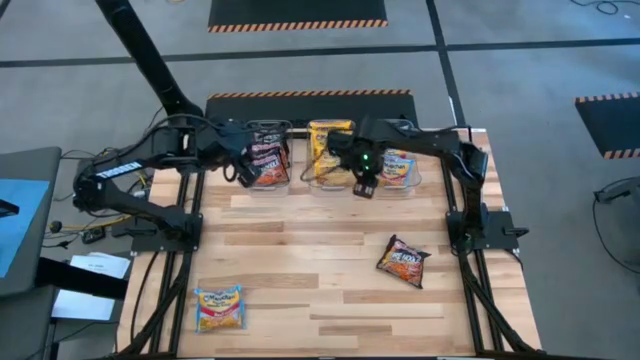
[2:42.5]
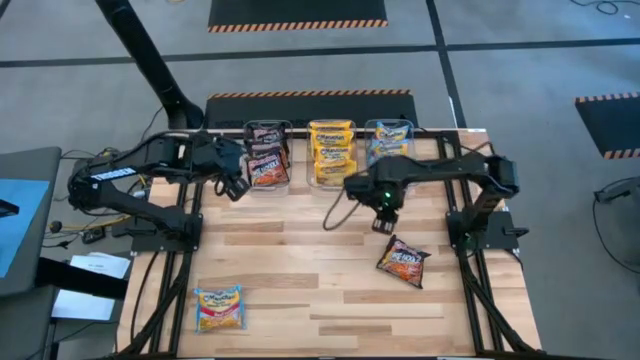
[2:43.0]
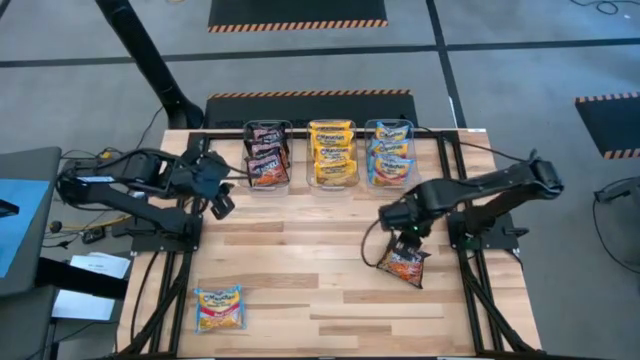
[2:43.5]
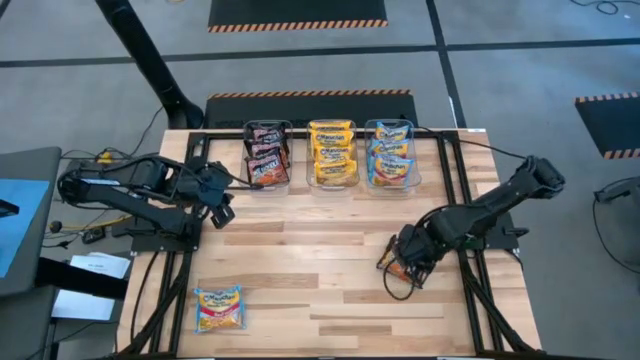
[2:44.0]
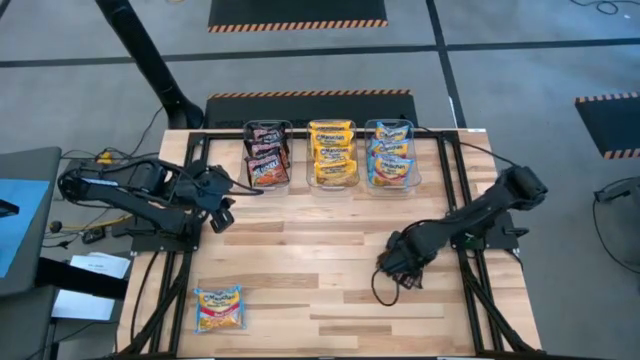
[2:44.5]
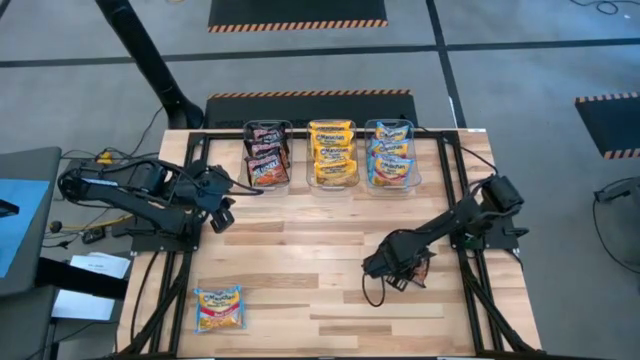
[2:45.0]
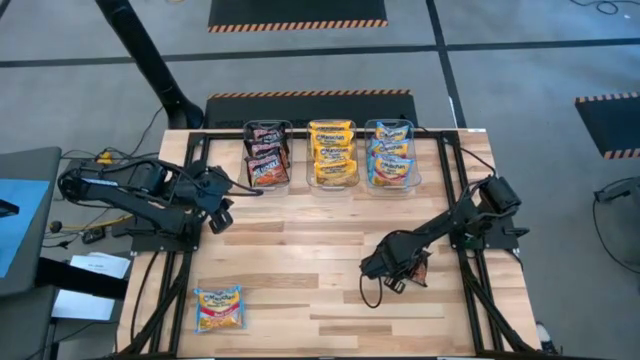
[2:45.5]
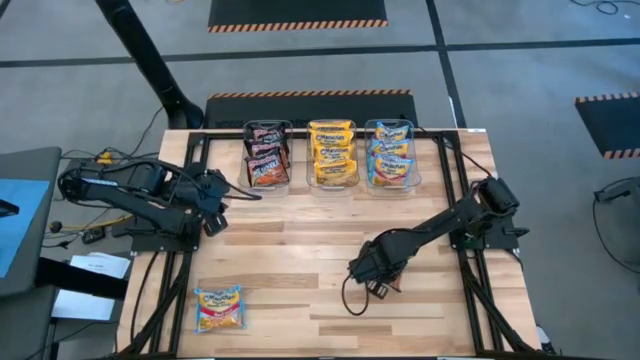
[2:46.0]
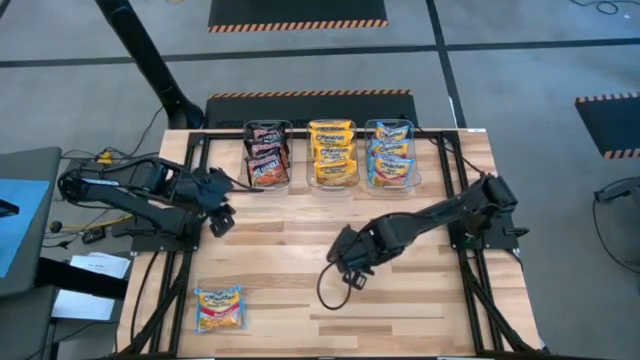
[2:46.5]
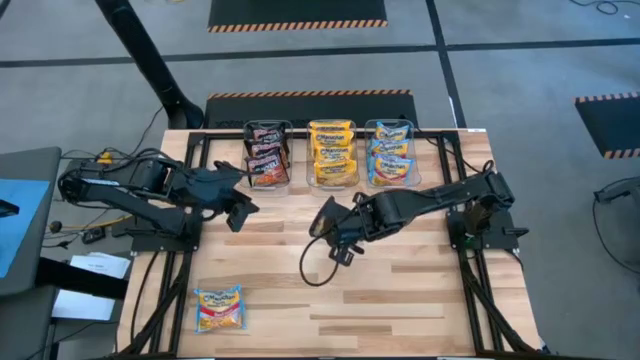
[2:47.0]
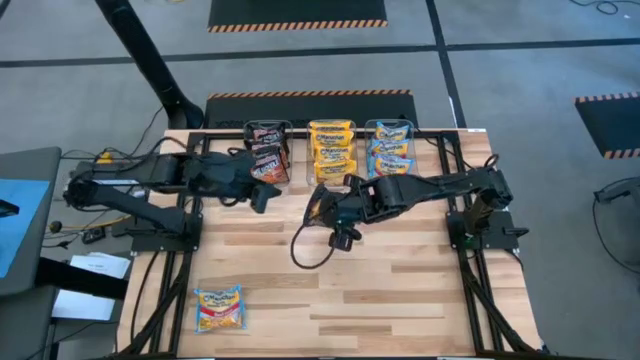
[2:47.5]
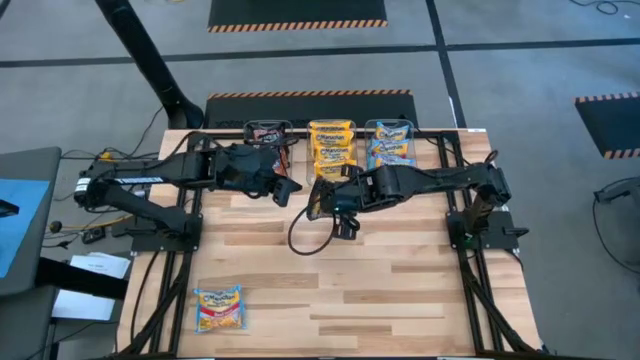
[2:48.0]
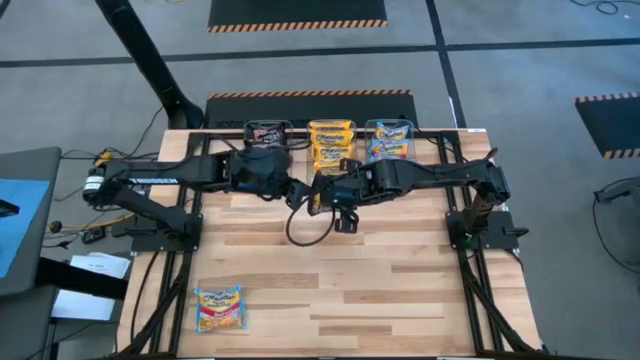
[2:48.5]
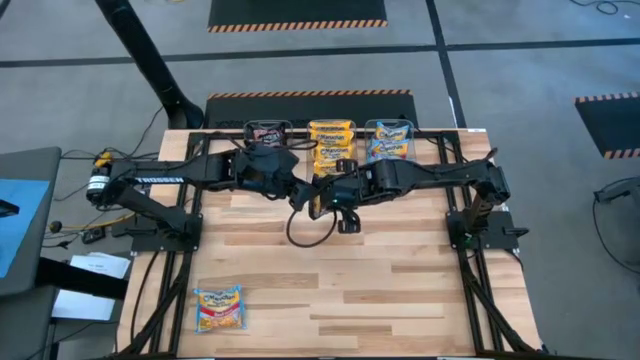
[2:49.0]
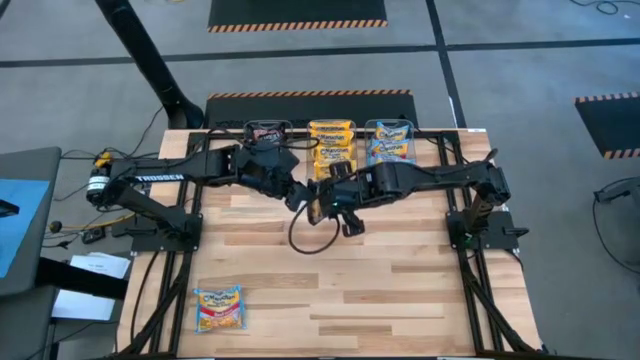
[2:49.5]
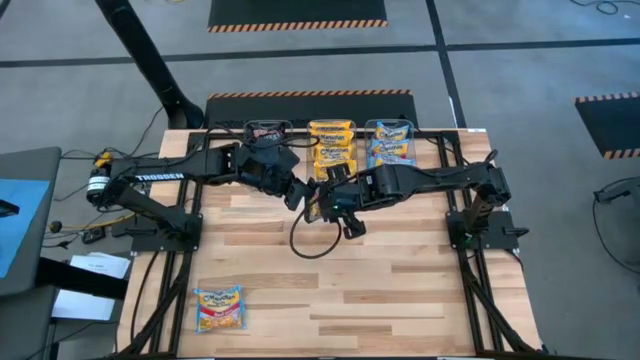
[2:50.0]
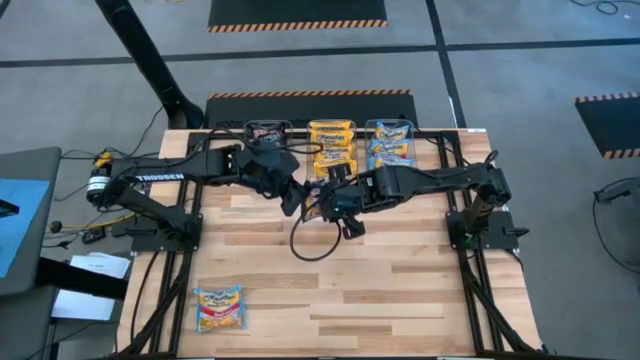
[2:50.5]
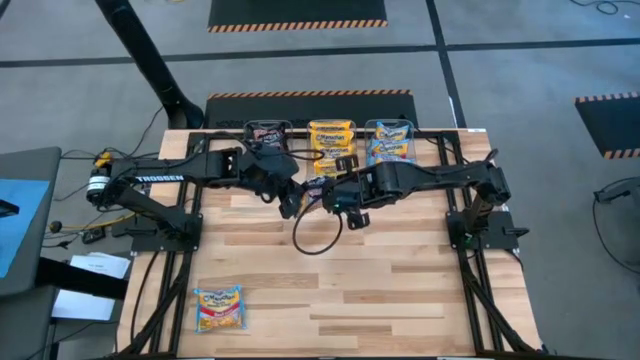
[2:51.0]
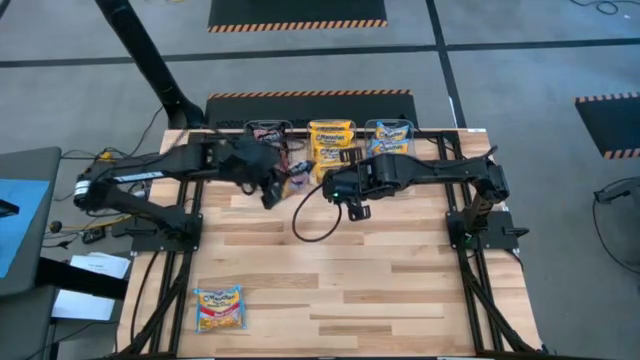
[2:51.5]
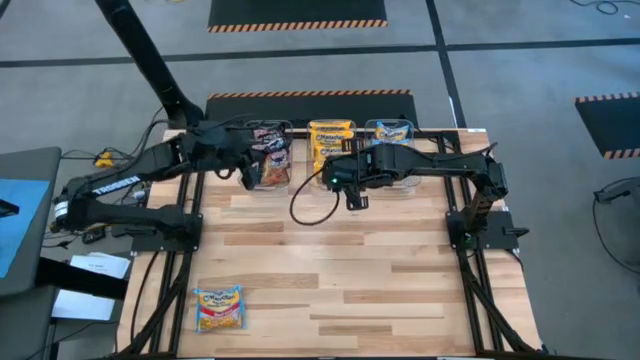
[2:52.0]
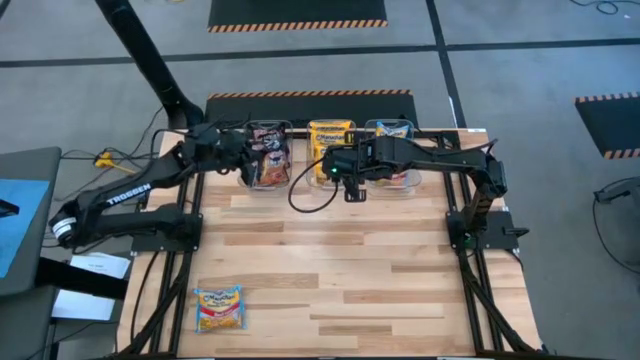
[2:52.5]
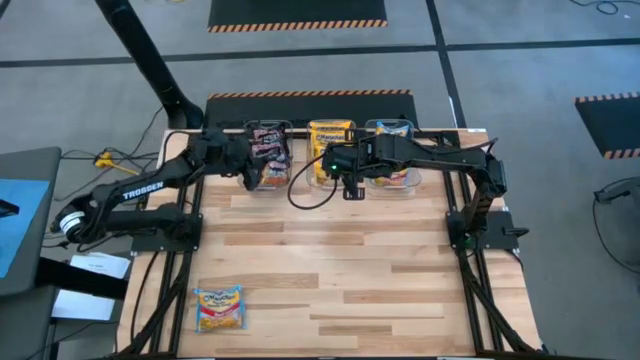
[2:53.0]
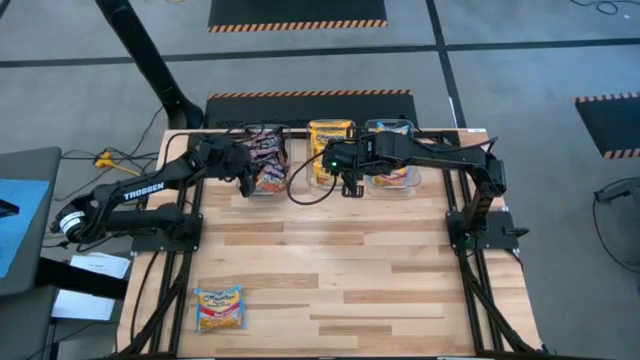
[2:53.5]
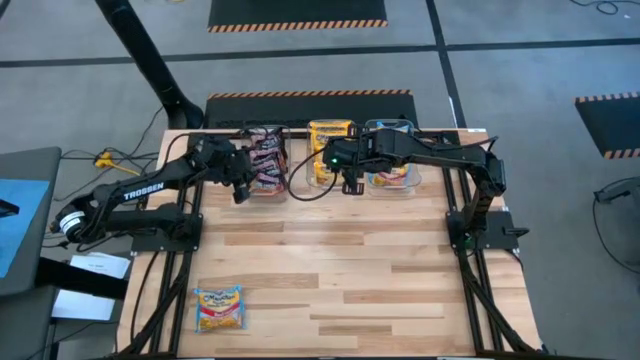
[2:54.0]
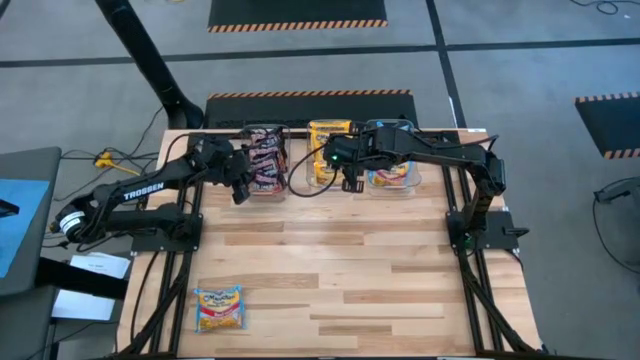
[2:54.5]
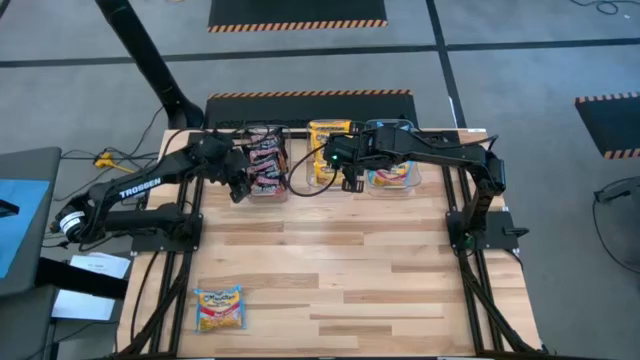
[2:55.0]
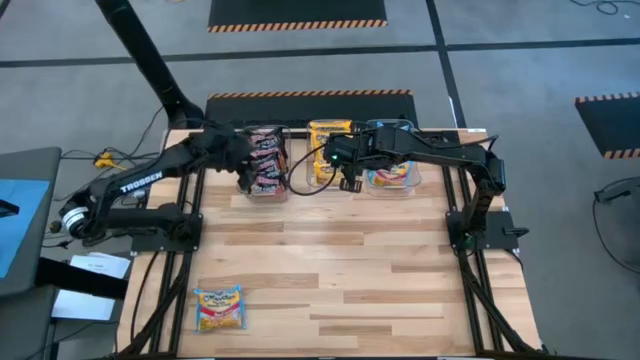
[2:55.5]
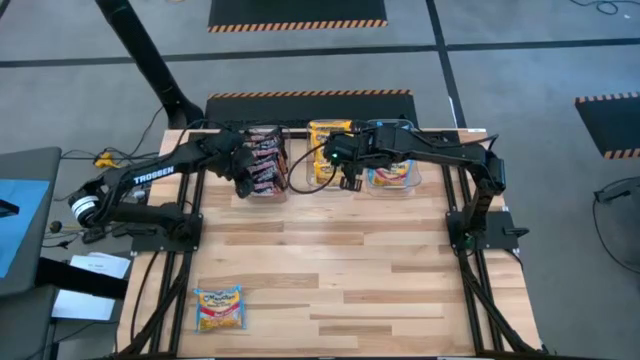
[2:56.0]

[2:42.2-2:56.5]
Task: Sort Maruchan noodles
Put the black noodle pack into the left transparent bin

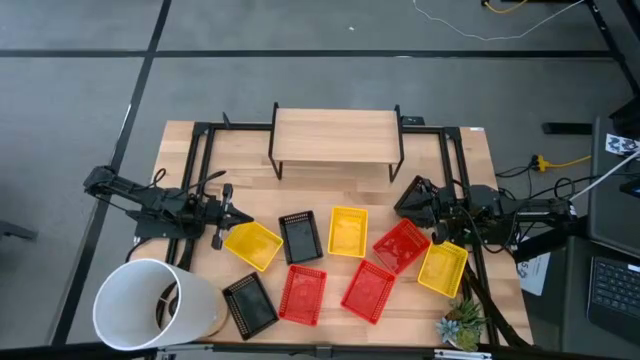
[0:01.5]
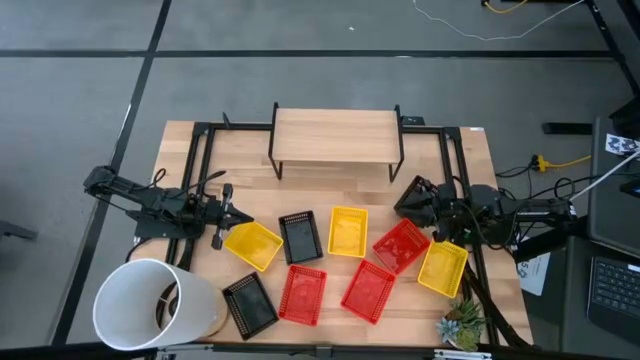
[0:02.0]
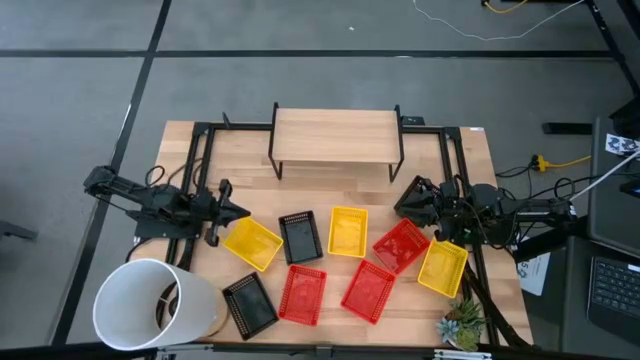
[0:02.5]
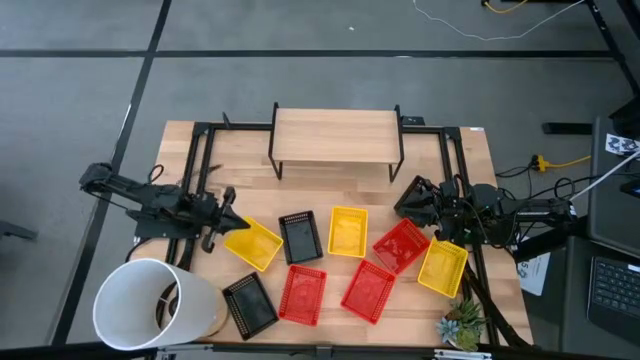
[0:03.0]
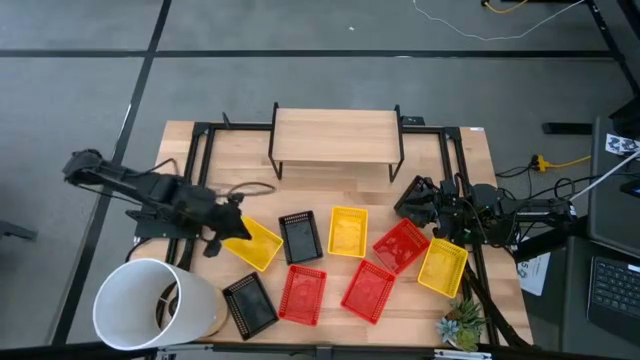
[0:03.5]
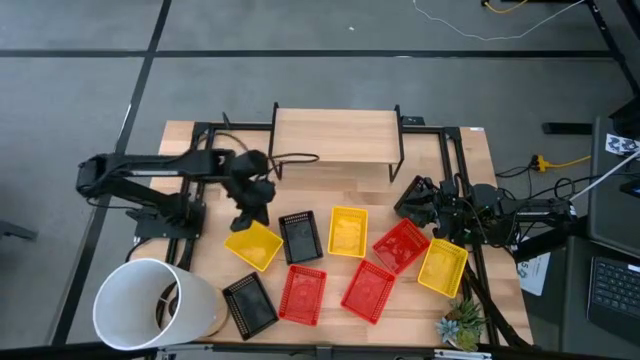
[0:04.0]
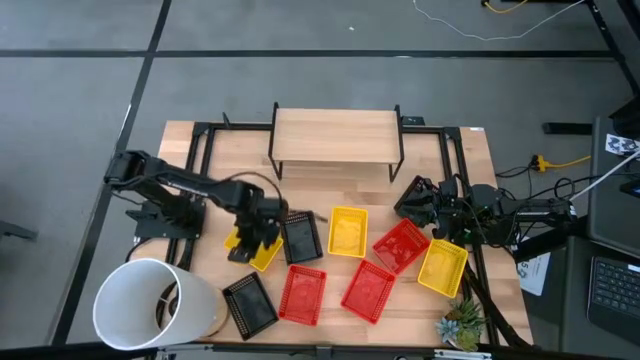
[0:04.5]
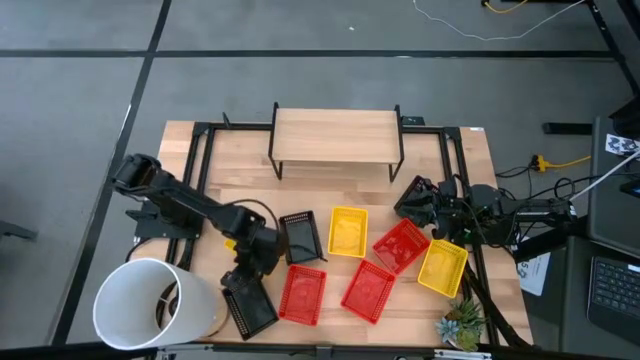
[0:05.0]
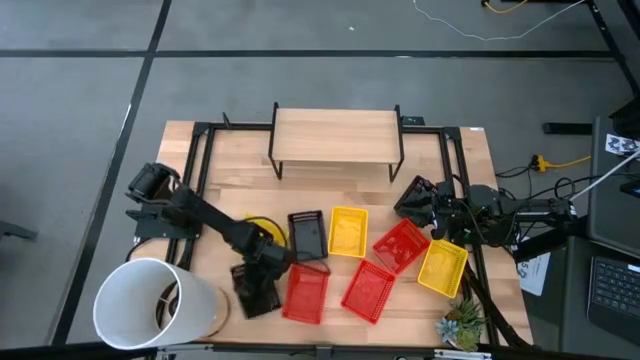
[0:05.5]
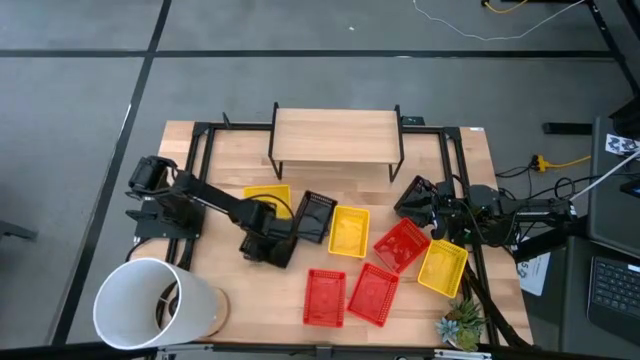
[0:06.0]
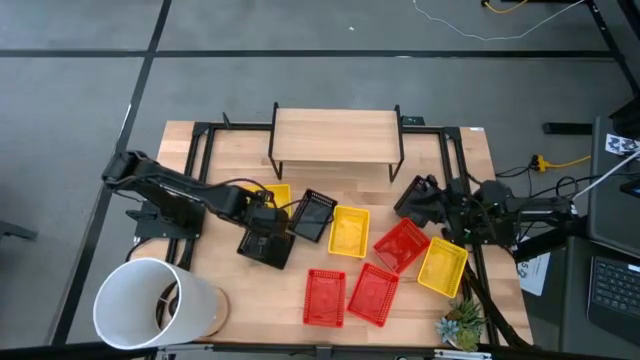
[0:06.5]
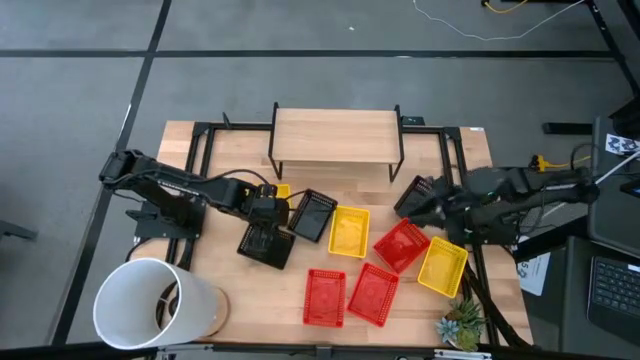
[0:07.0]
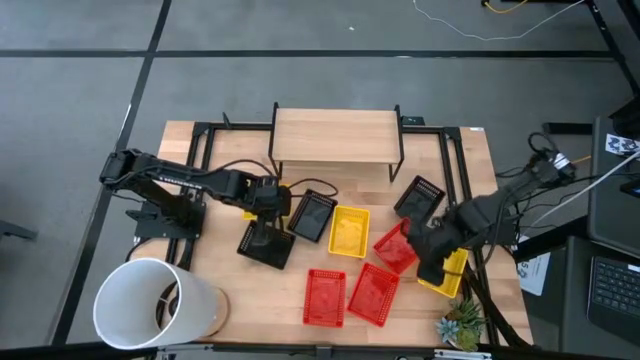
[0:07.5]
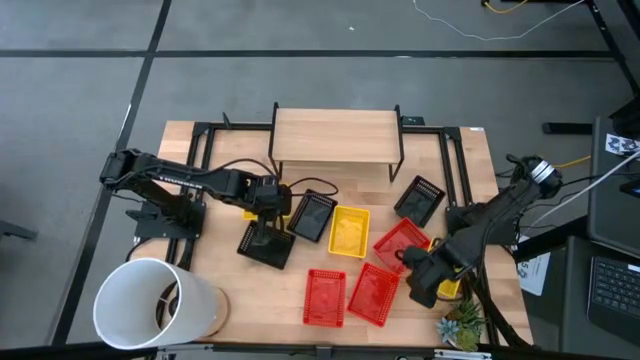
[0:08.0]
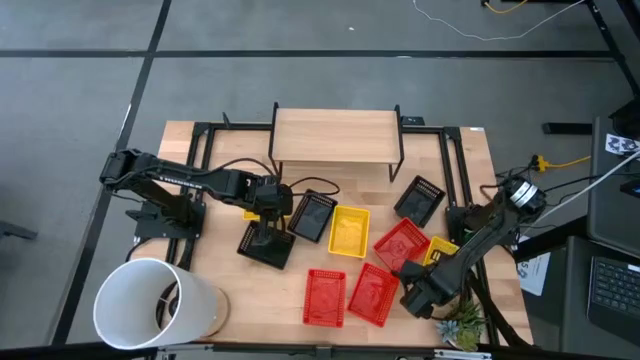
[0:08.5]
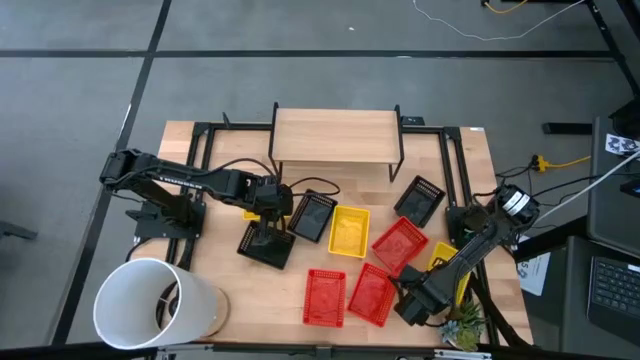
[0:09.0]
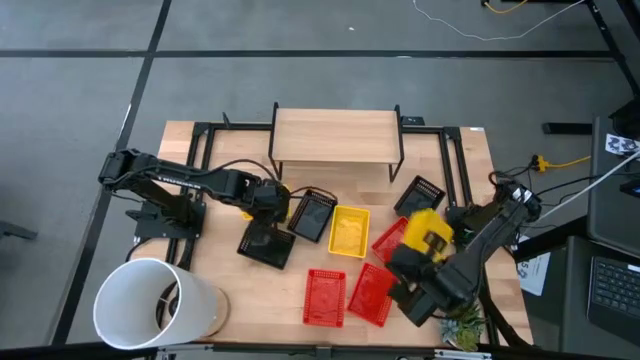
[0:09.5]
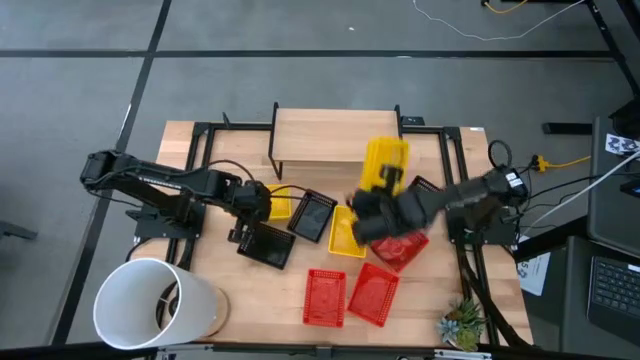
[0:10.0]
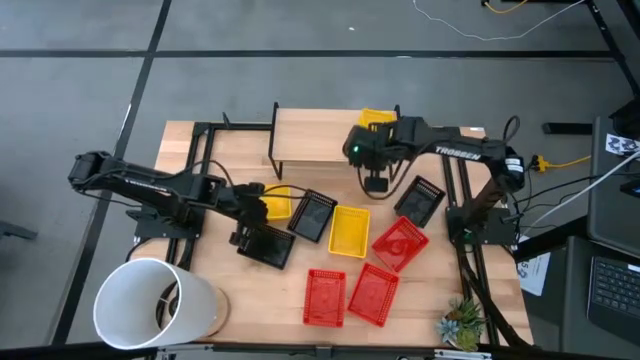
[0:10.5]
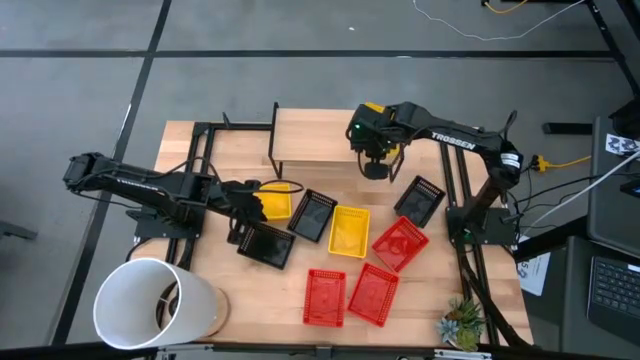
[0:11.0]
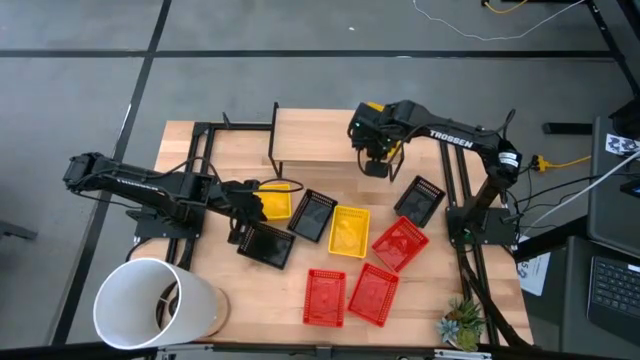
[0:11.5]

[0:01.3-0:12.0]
Task: Stack baskets on shelf by color
Put the right yellow basket on the shelf
